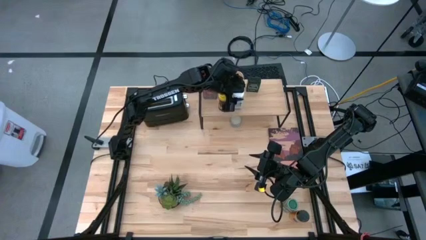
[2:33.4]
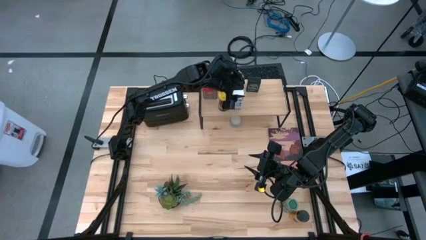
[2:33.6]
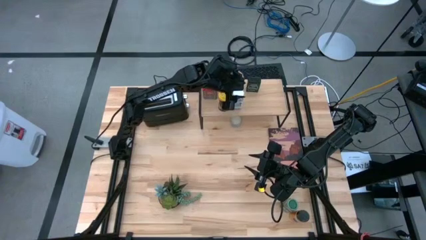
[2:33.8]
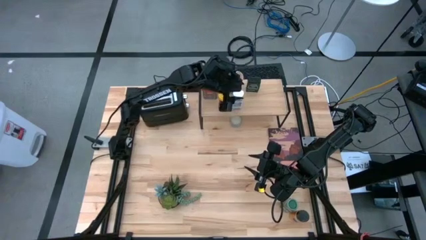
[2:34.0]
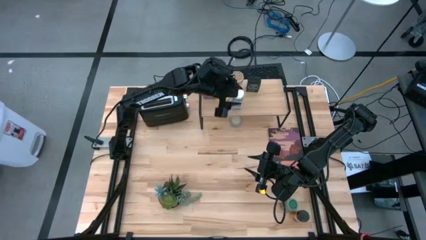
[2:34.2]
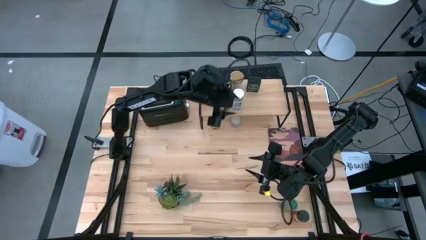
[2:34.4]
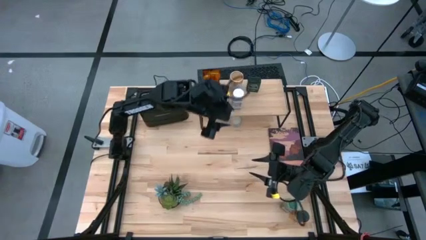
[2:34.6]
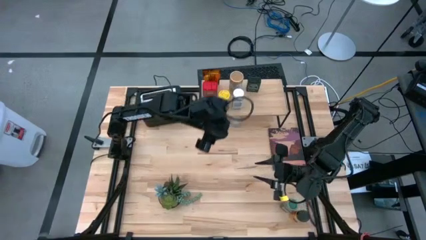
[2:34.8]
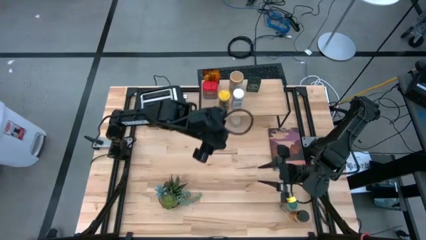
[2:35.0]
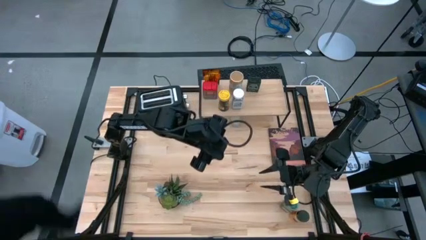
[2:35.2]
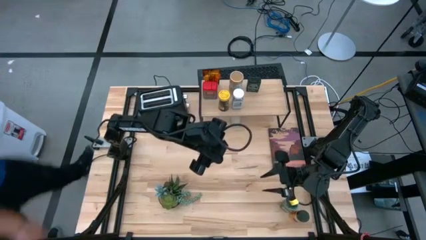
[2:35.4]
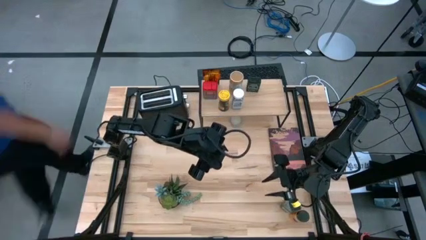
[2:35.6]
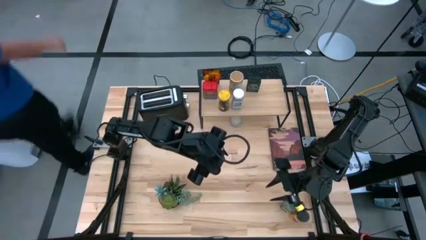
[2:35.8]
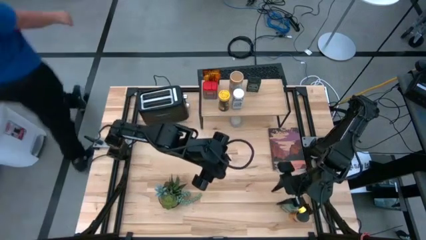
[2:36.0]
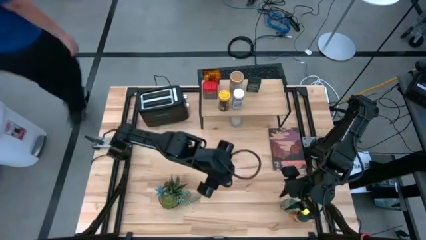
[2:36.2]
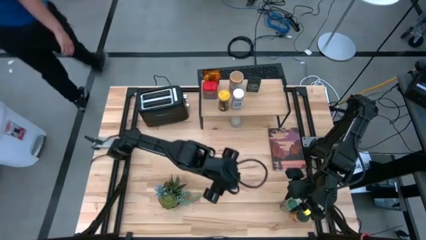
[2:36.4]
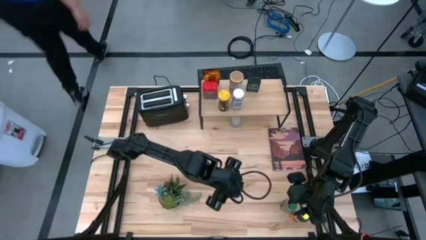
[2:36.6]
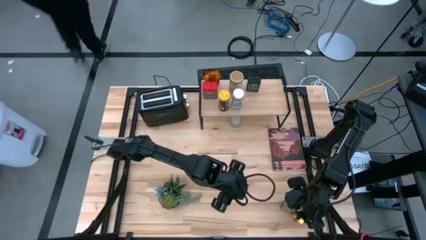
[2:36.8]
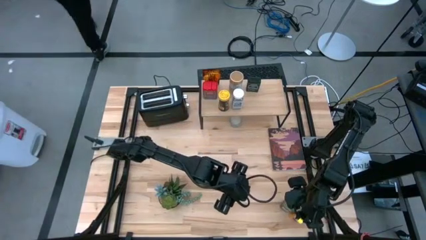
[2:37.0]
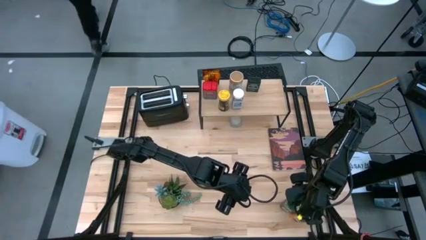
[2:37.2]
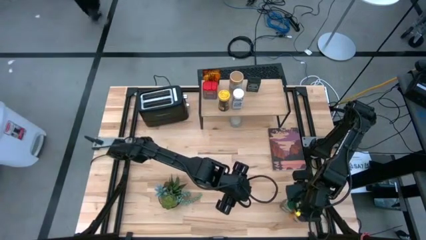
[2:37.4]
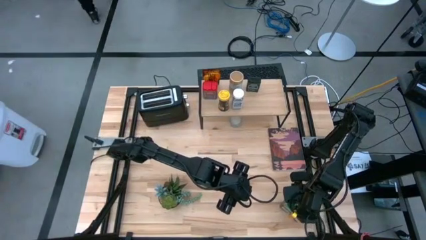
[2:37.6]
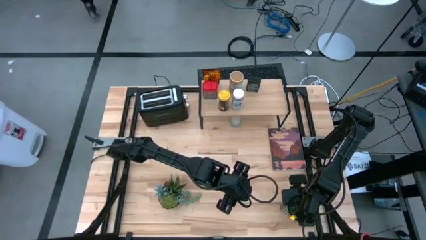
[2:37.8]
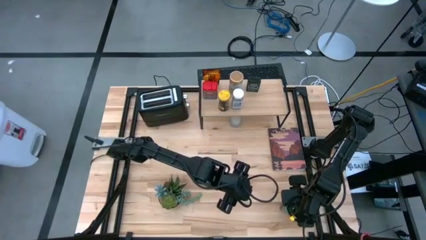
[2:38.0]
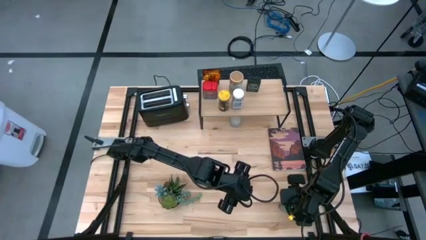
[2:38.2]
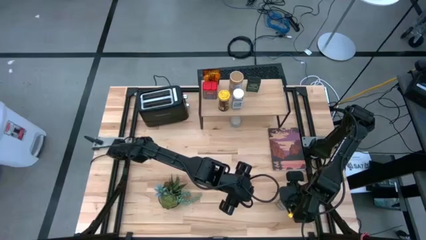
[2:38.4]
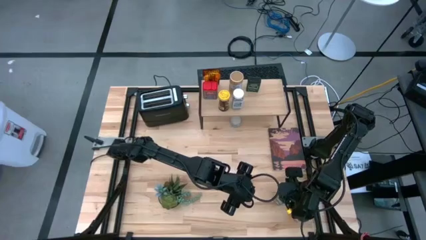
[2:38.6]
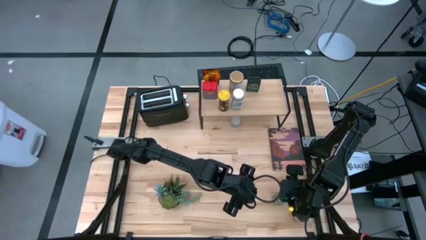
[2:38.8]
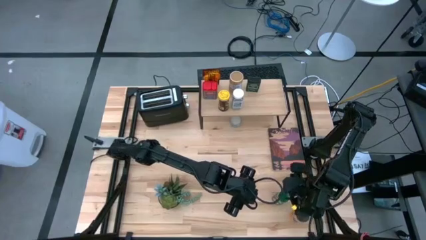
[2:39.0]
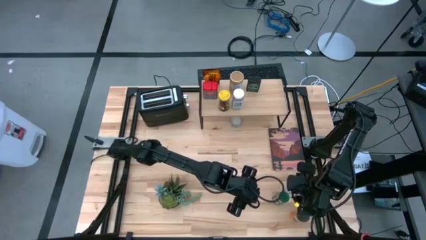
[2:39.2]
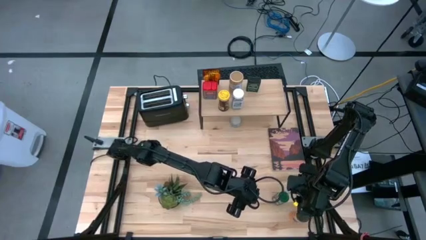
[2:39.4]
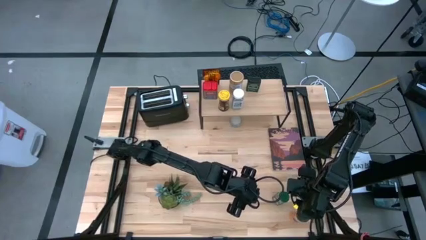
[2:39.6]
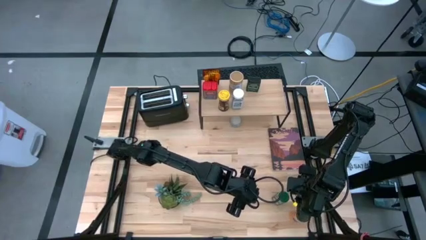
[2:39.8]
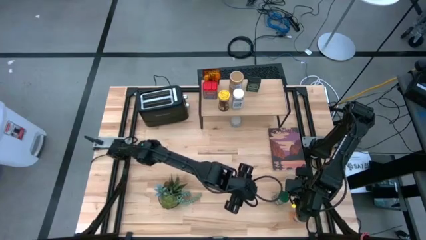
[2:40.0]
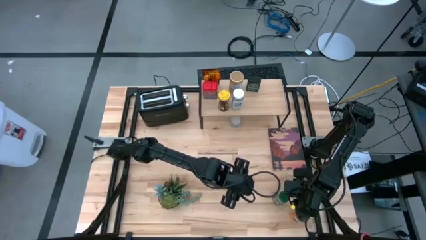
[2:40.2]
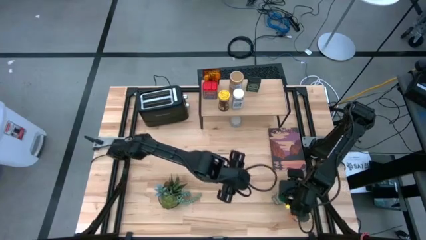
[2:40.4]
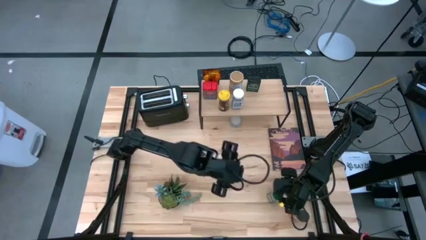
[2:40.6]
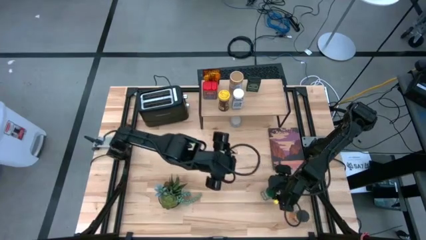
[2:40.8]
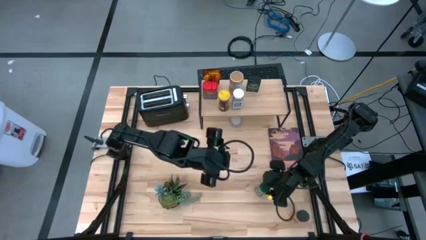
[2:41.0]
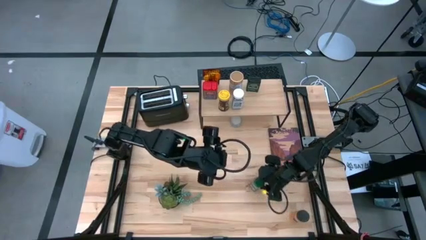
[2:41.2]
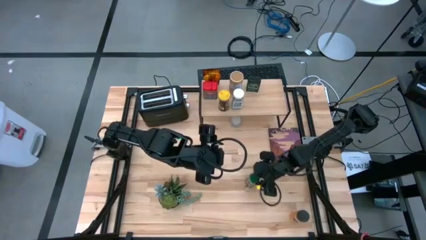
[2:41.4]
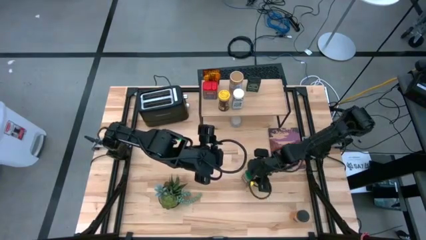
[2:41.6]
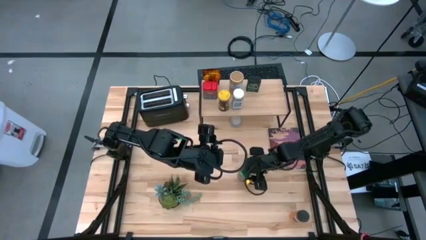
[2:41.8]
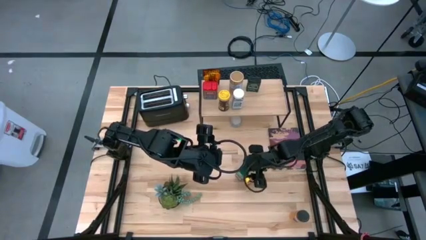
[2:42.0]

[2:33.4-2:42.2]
Task: Shelf spices
Move the green seasoning bottle to the center of the table

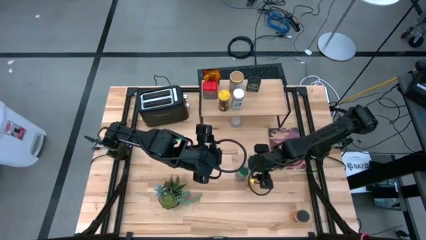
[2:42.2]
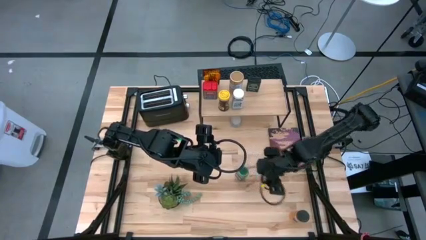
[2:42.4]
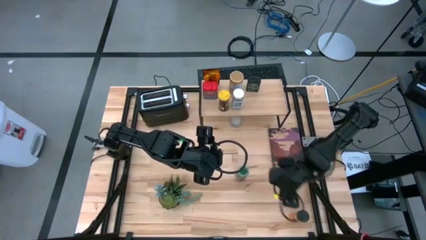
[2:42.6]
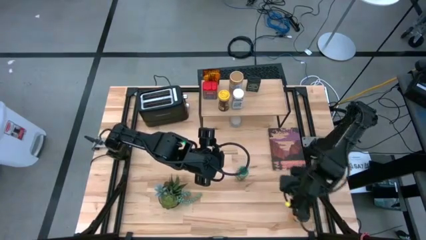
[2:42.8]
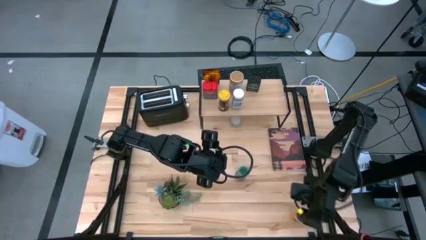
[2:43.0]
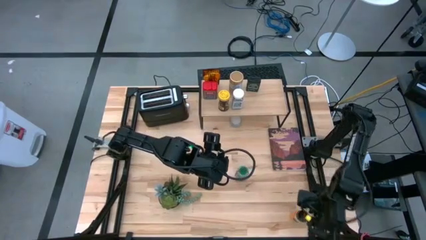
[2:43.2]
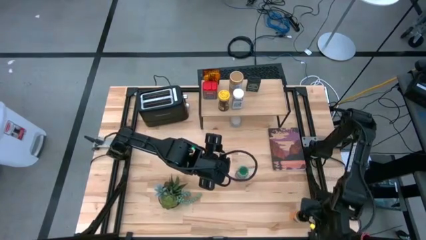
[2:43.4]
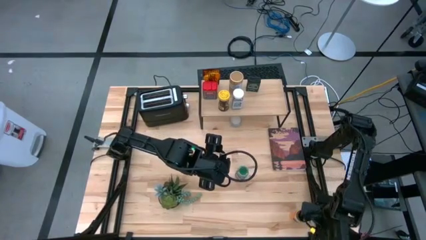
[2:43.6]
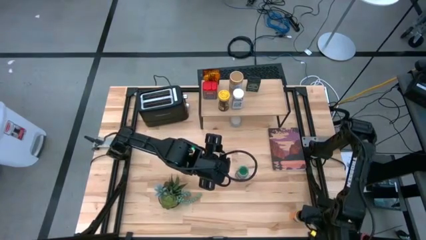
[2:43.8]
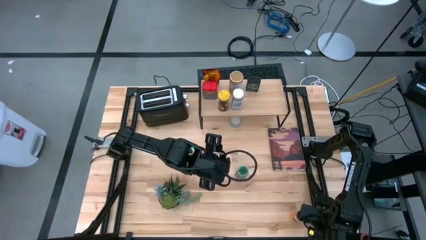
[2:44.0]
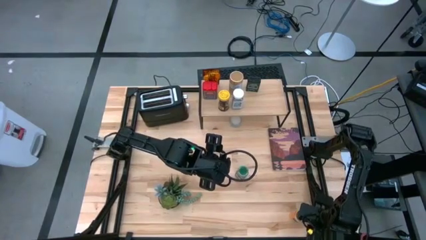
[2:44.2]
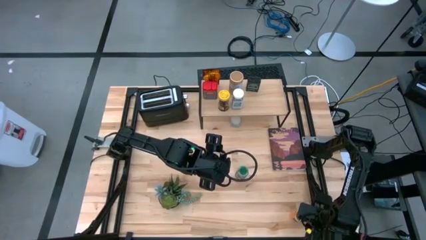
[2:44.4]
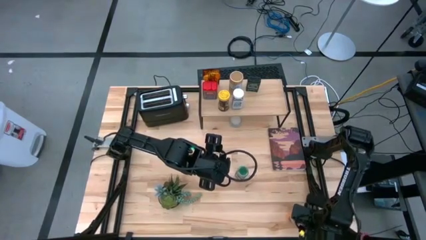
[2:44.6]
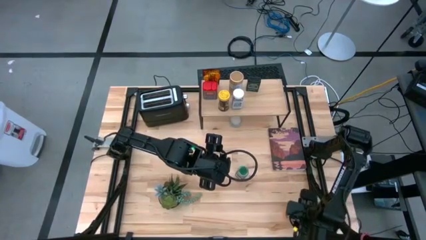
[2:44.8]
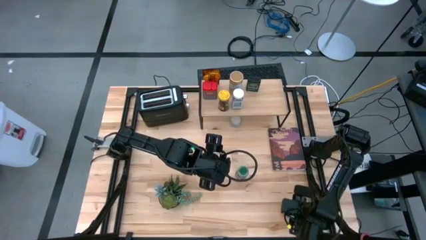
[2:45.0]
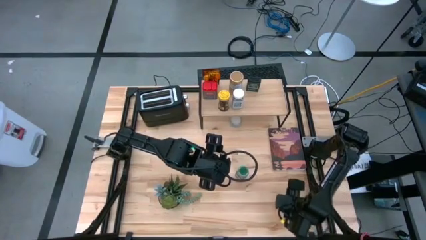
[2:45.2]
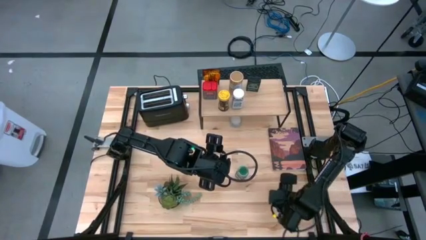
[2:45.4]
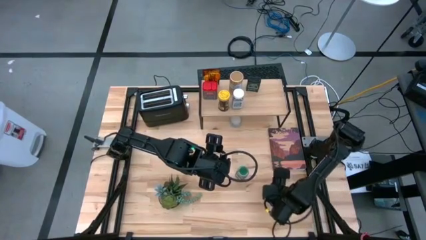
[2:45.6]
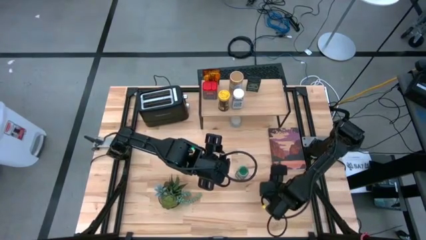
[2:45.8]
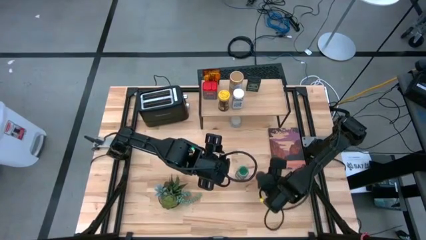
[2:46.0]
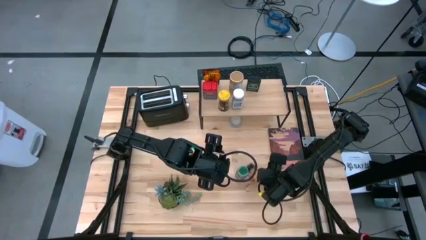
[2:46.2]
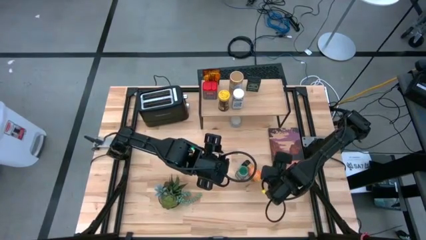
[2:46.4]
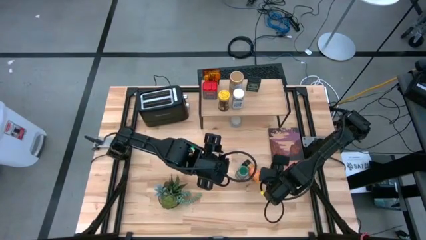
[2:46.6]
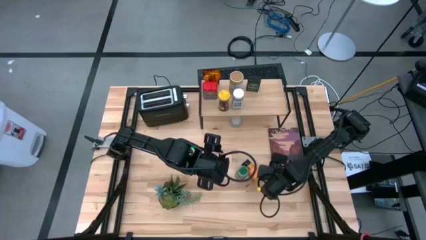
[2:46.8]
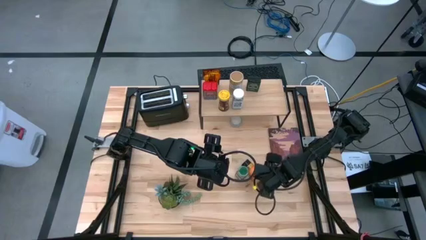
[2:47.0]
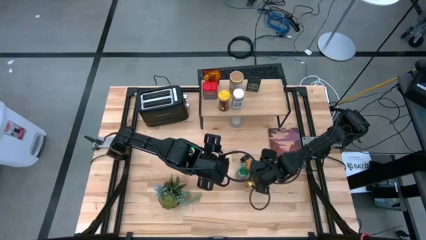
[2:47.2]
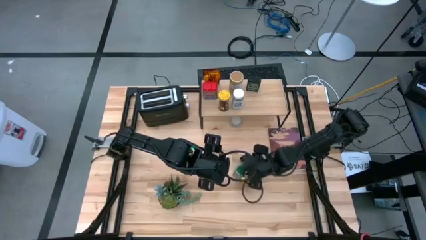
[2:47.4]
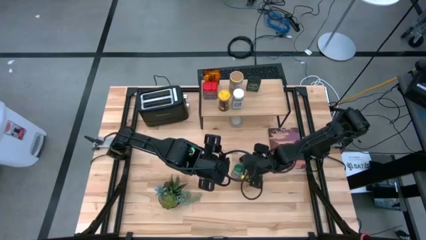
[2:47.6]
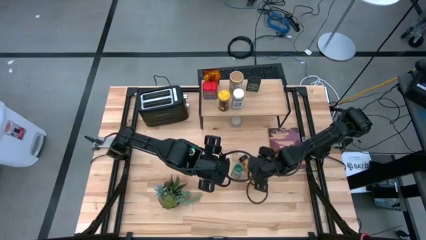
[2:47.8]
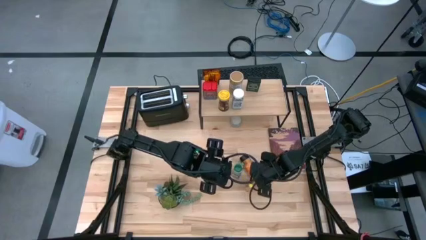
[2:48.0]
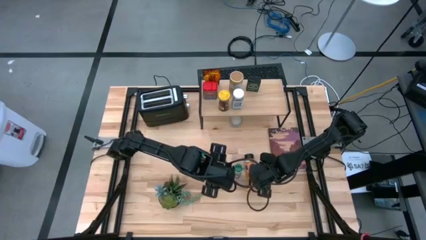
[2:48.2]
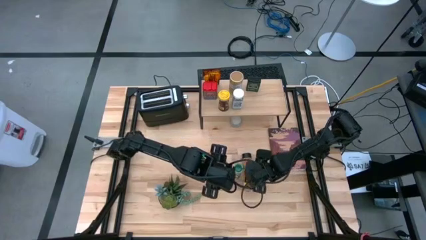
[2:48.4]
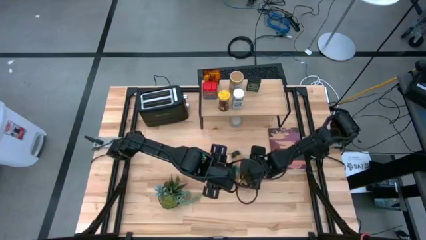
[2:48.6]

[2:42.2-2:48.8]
Move the orange seasoning bottle to the center of the table

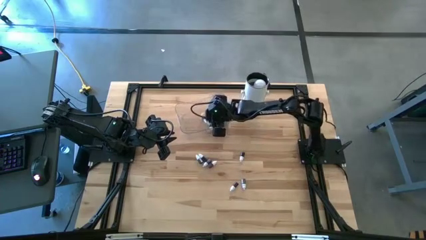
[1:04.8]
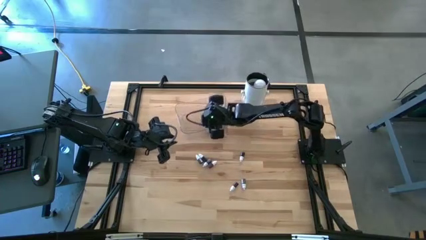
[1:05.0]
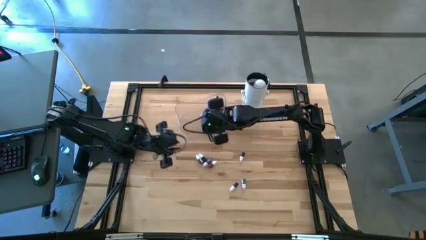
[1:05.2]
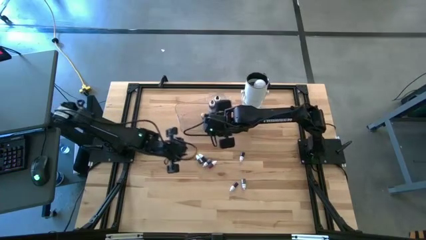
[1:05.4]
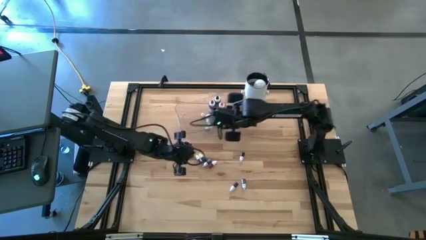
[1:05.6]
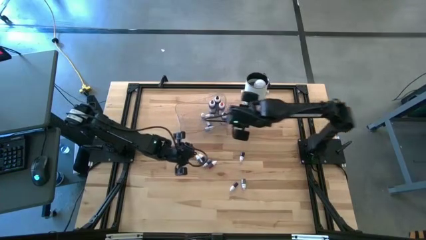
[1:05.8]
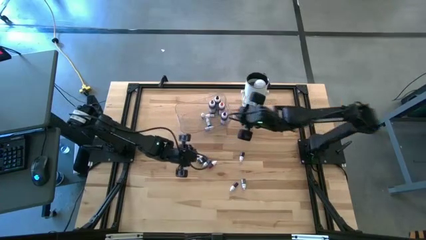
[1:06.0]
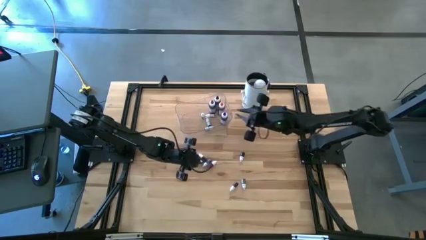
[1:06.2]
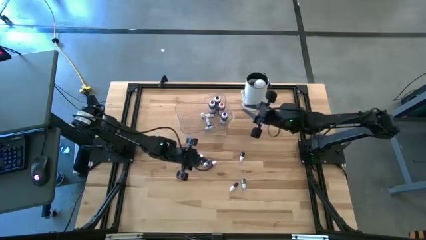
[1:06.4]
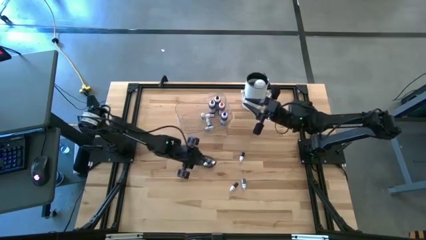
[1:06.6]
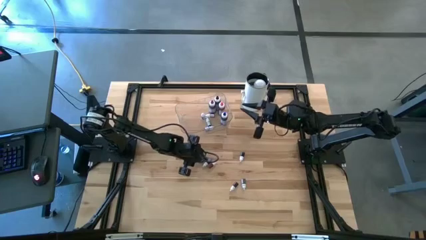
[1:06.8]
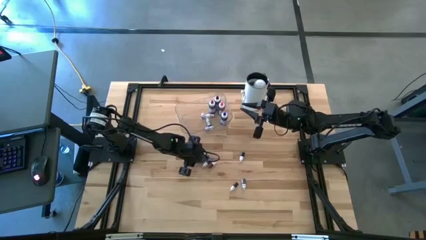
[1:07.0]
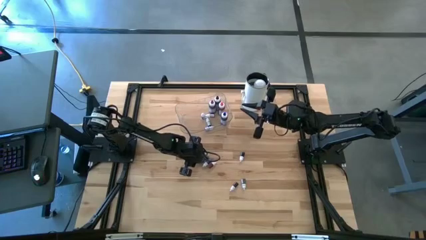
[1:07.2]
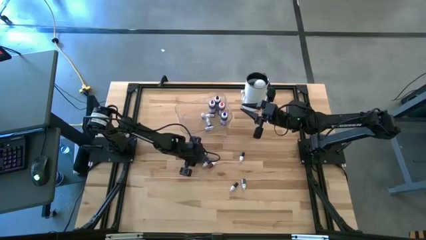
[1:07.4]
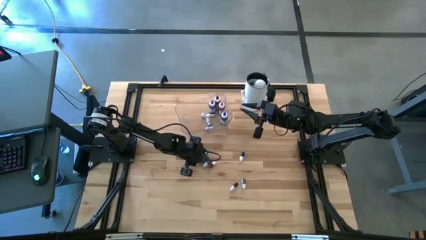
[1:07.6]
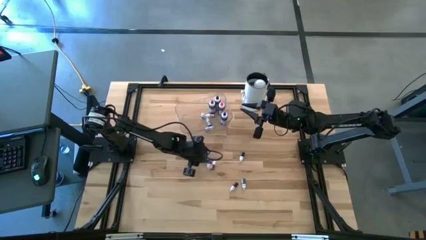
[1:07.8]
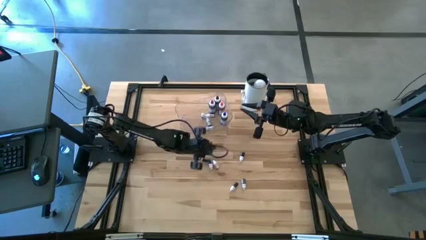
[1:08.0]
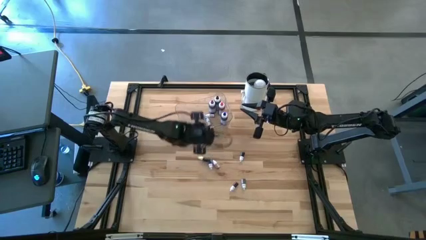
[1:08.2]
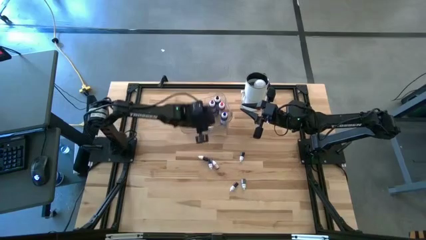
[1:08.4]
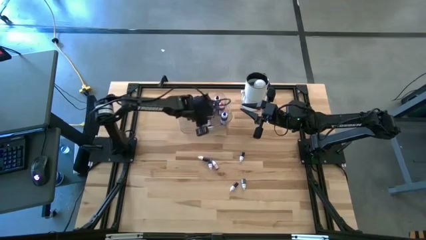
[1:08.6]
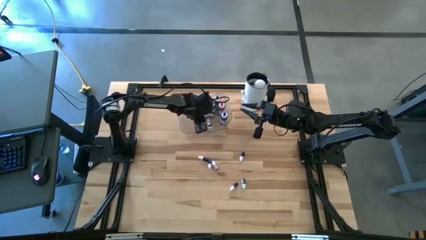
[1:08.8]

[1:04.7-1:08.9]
Task: Pick & Place food coloring
Put the small brown food coloring bottle into the transparent container
